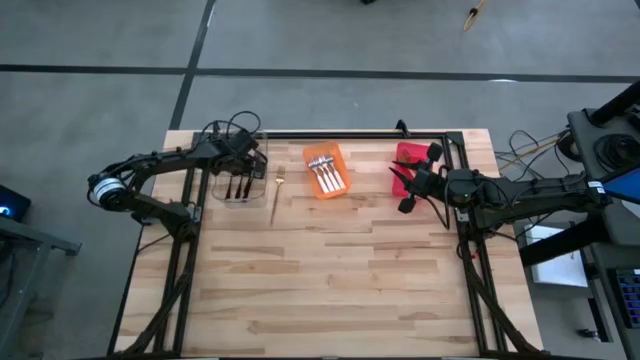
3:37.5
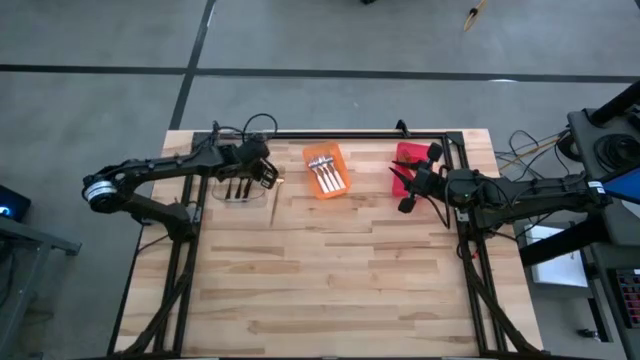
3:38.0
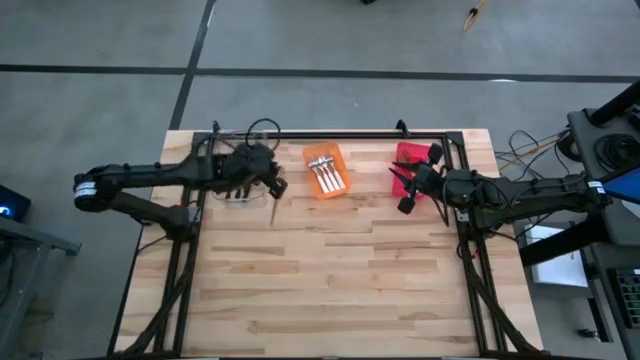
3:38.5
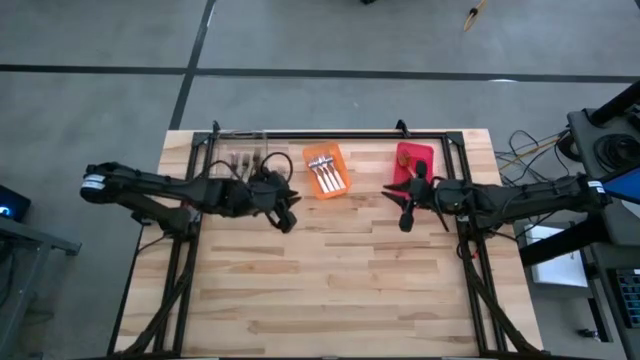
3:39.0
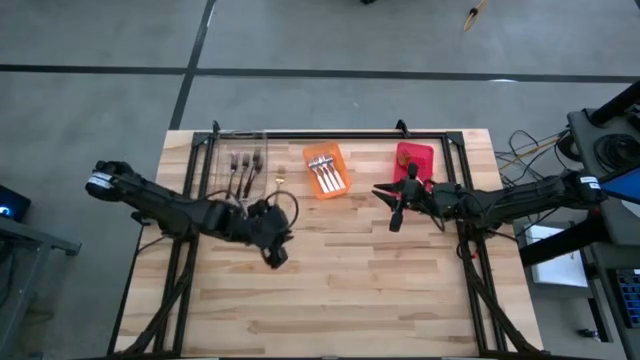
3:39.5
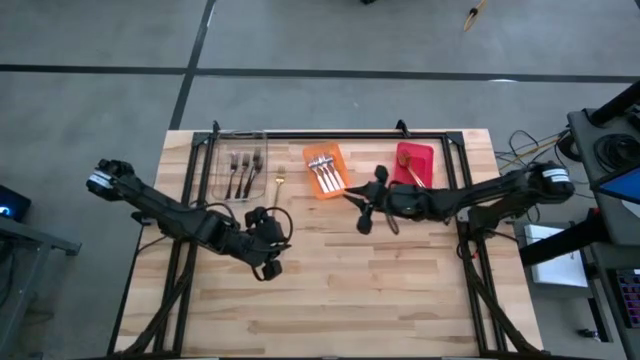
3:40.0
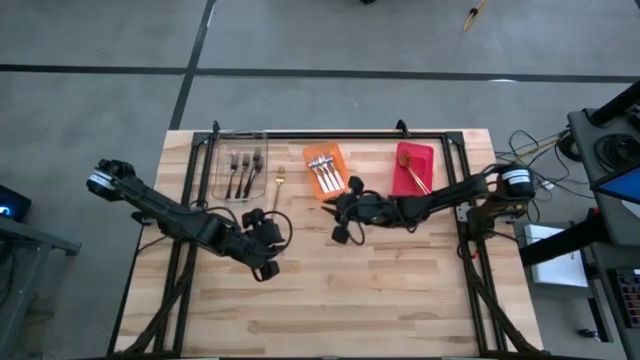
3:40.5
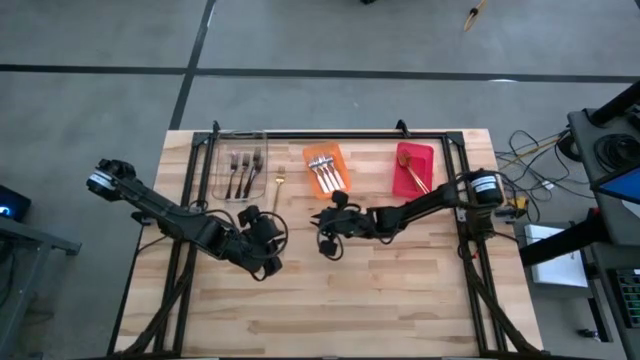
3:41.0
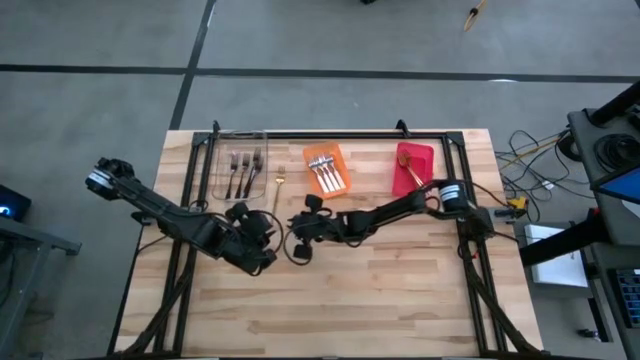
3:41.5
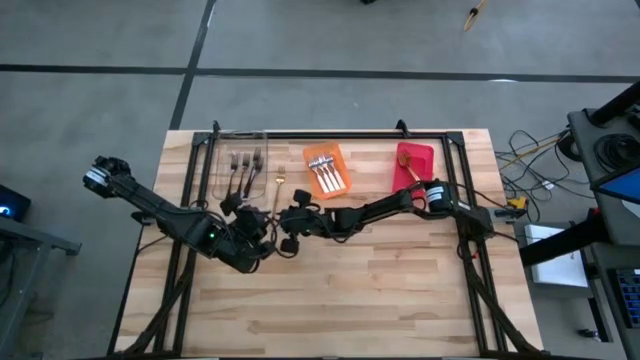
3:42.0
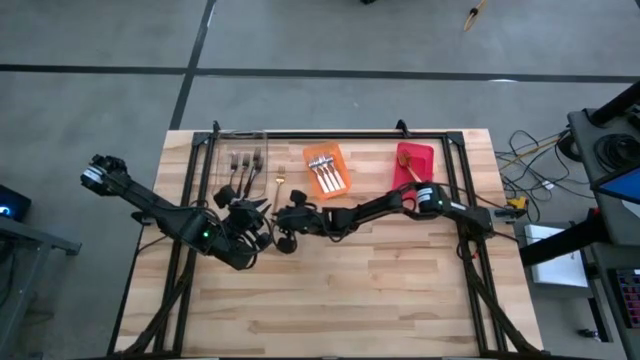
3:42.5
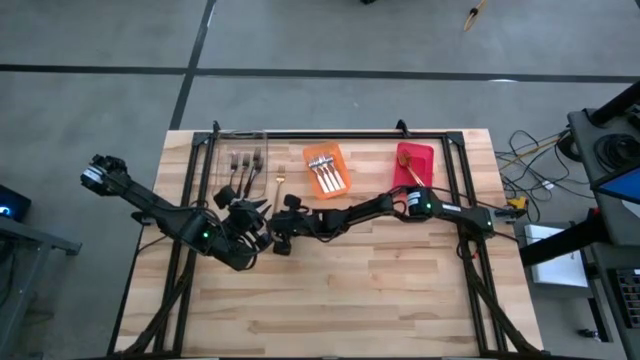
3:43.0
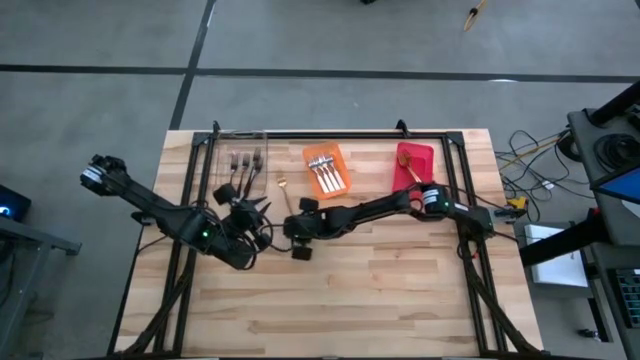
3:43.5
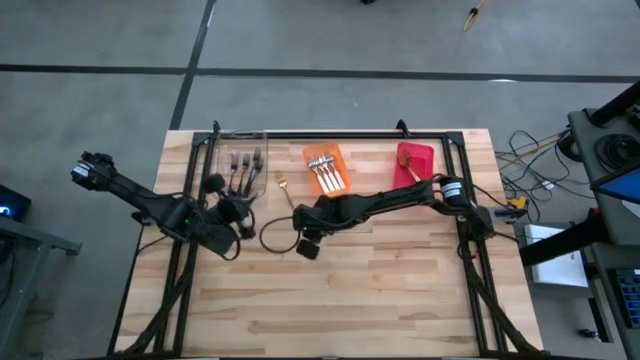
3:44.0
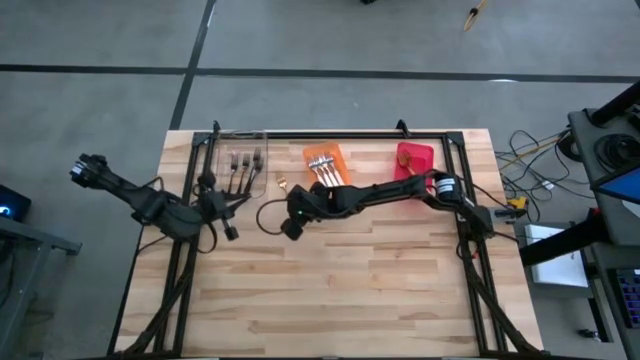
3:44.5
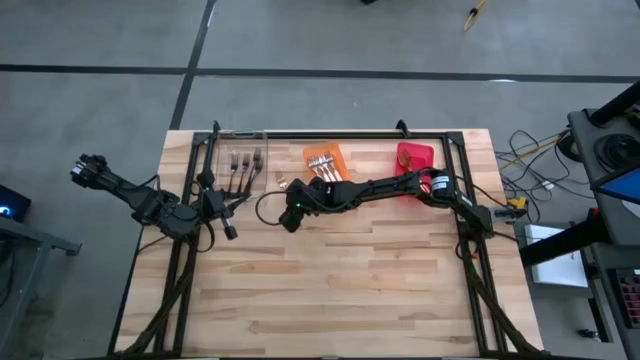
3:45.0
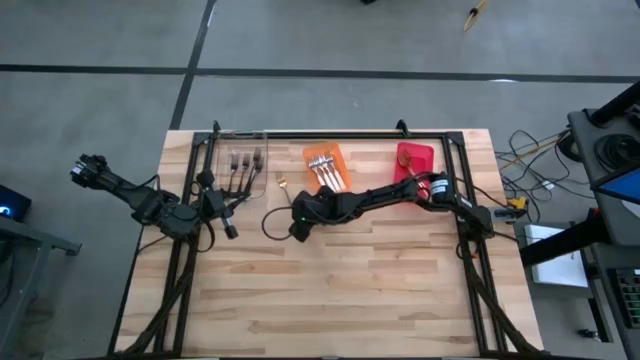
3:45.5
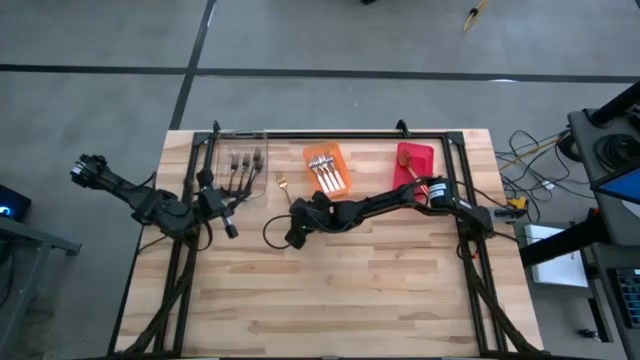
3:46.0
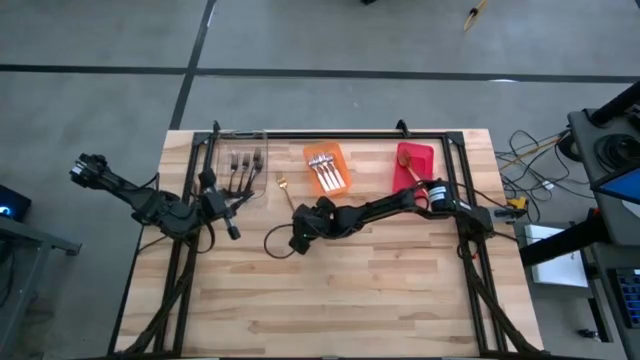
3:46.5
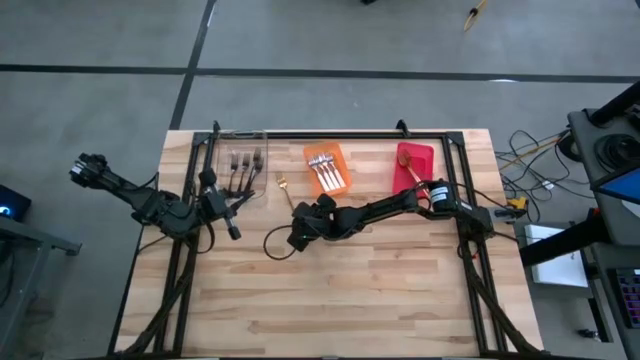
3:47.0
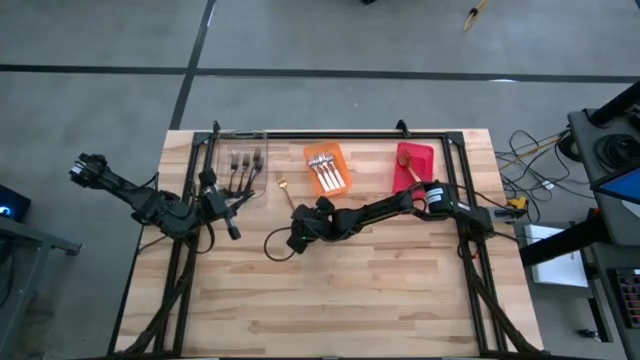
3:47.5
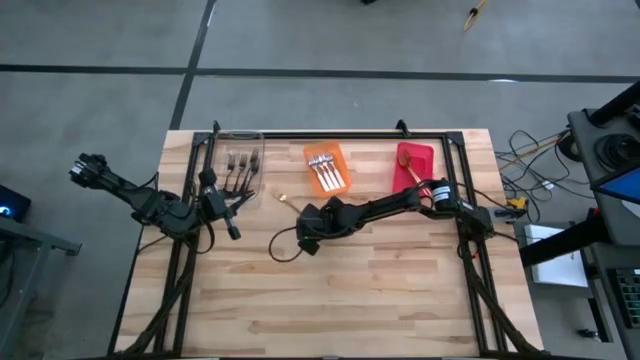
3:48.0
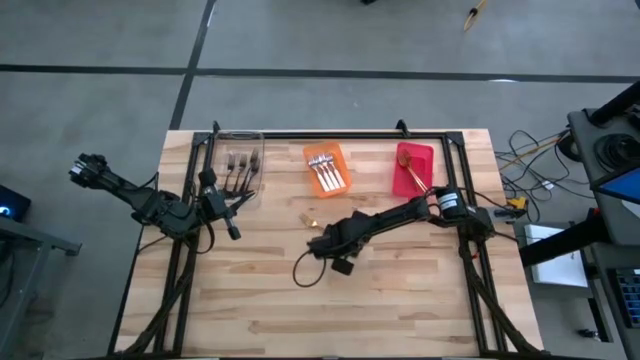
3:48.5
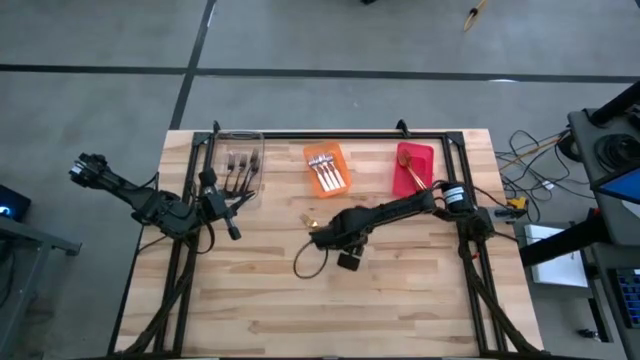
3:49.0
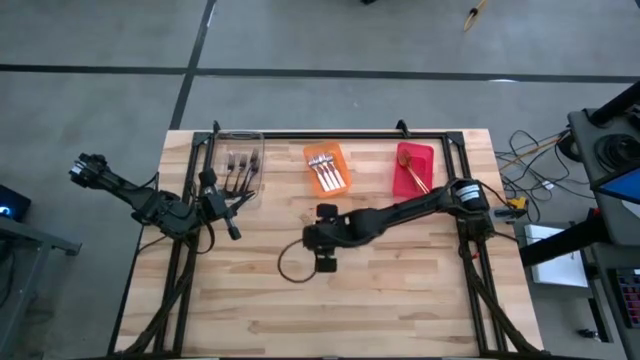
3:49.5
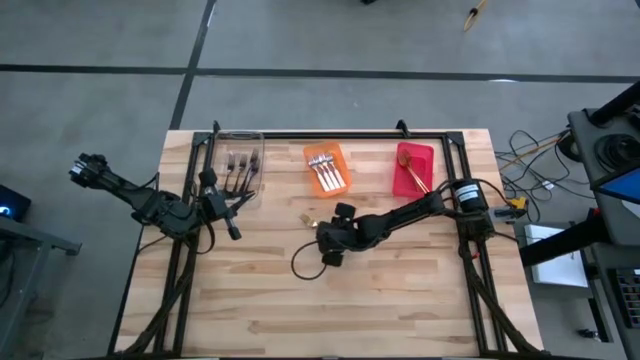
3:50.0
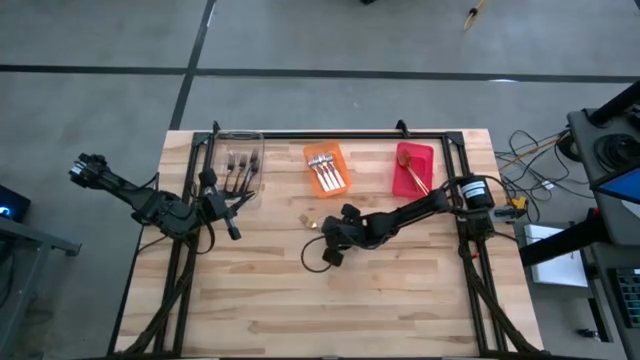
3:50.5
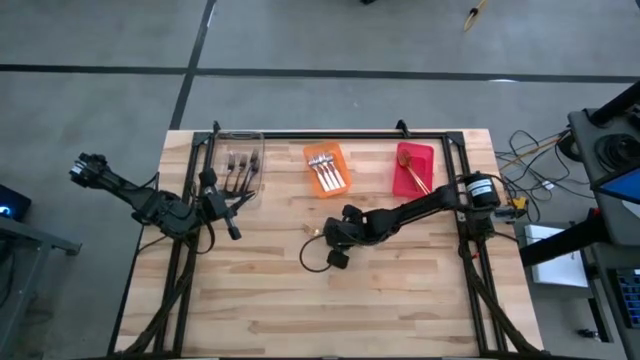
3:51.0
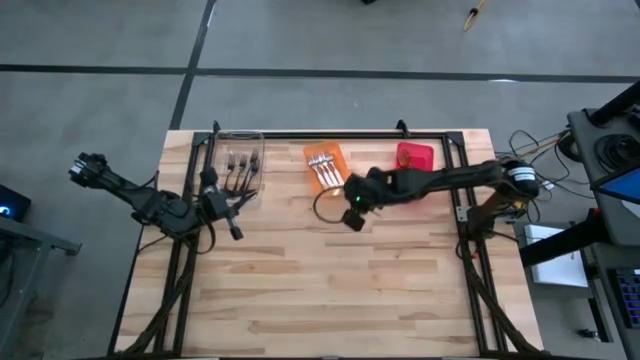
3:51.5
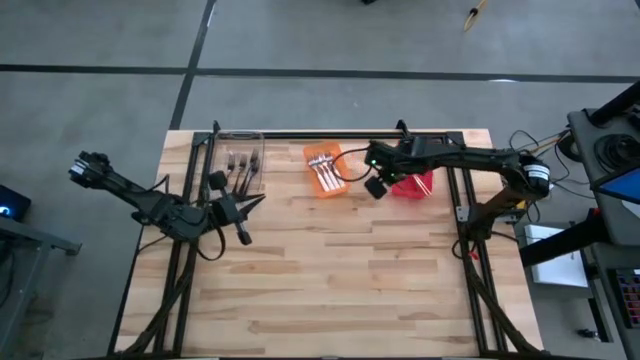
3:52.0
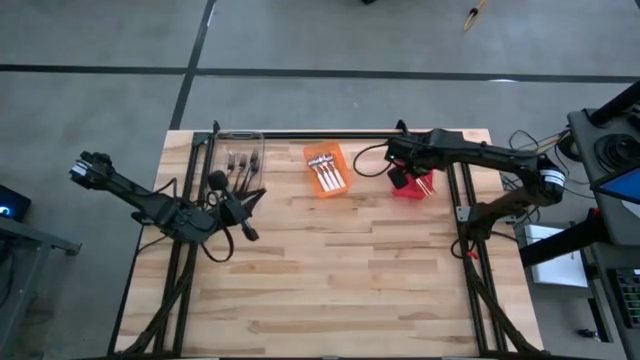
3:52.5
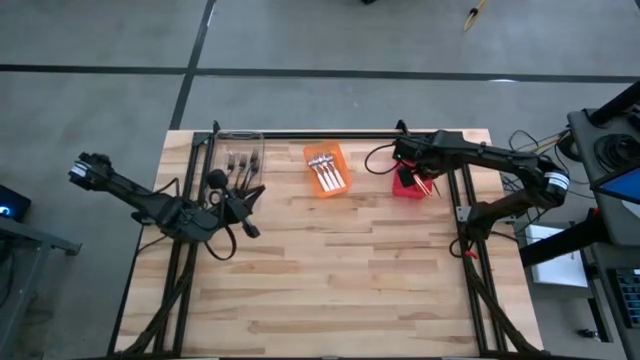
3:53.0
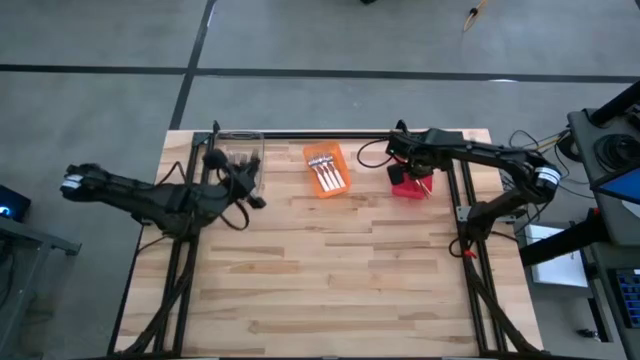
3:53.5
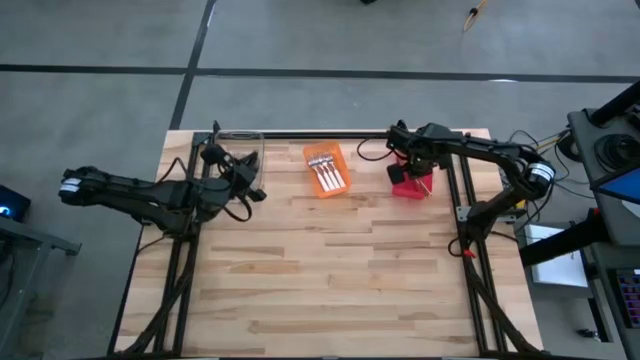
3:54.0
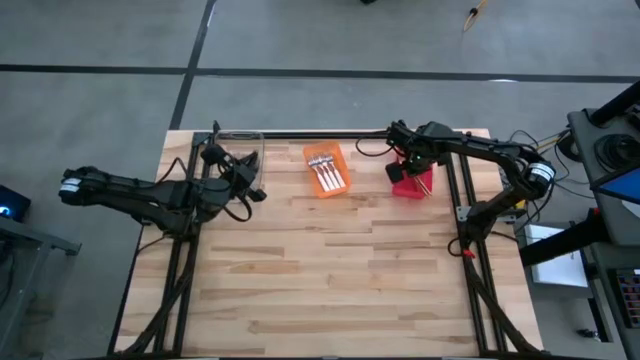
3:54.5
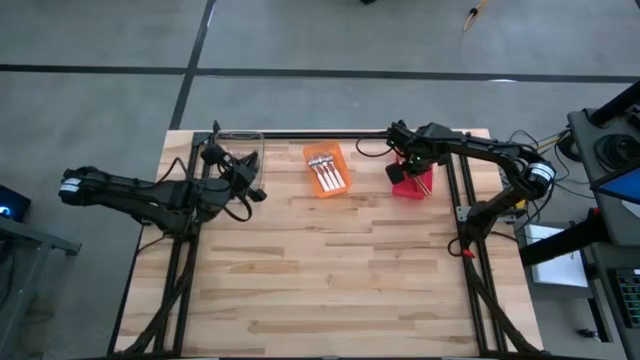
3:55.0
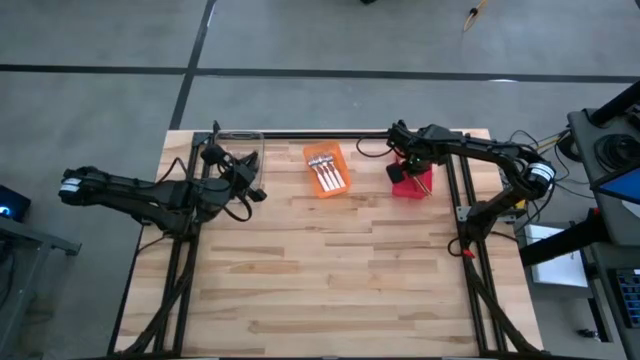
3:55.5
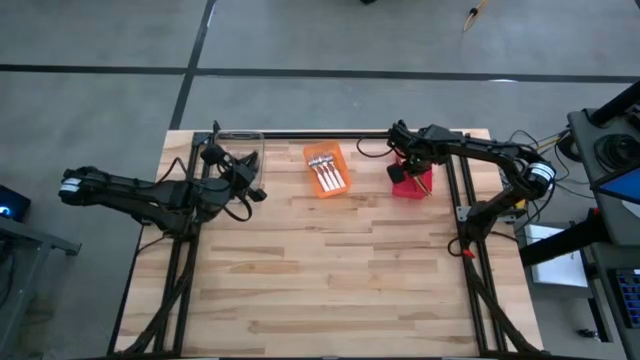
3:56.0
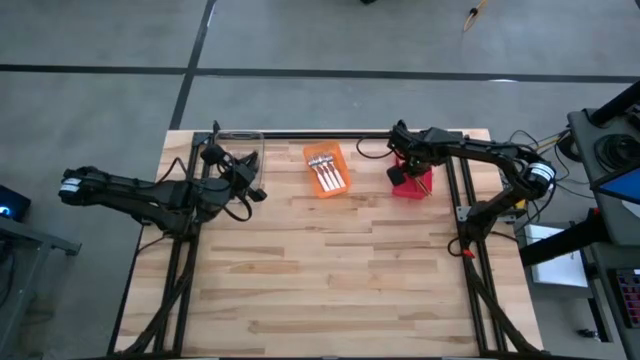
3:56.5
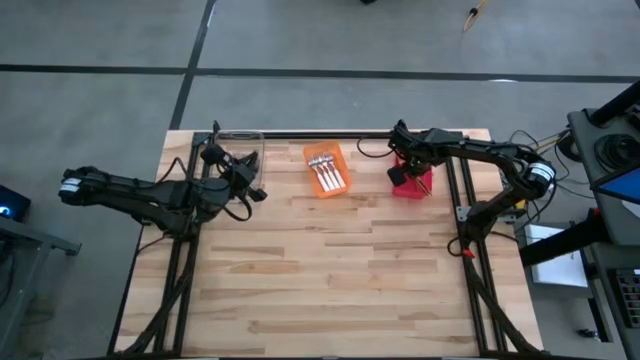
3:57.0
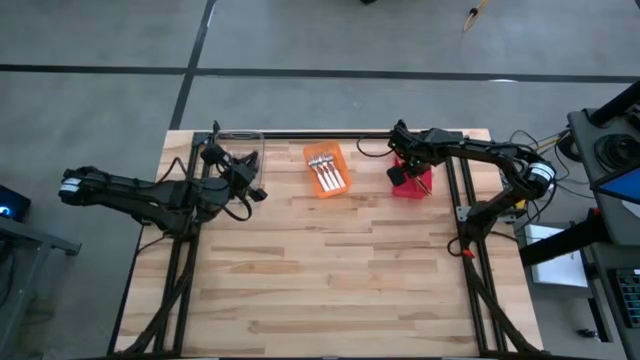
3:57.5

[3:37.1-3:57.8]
Task: Sort silverware by color (type)
Put the gold fork into the red bin
